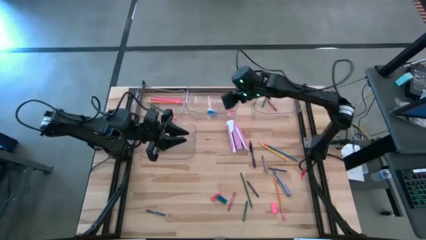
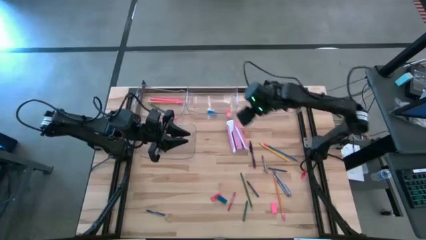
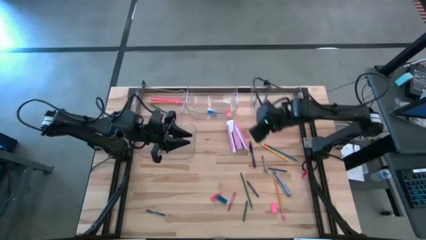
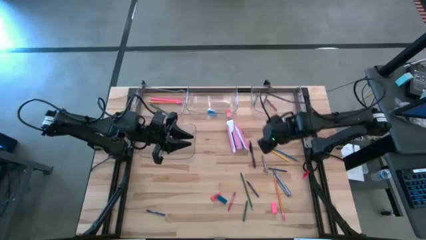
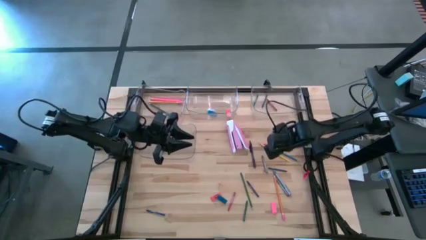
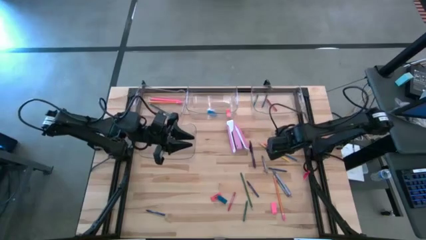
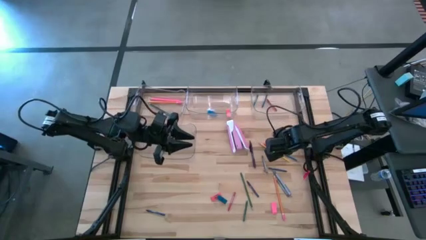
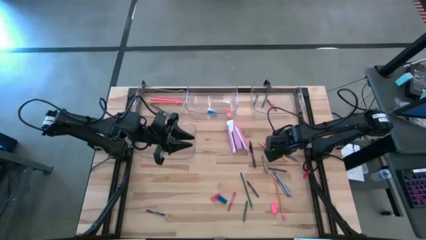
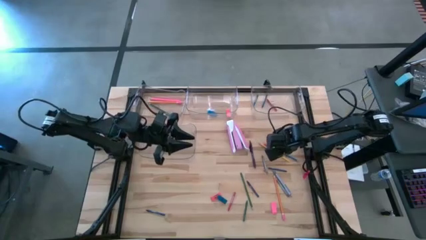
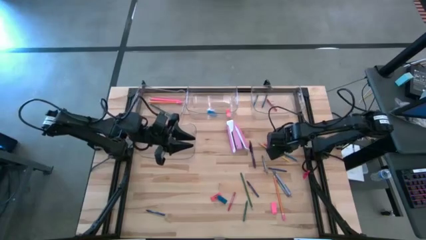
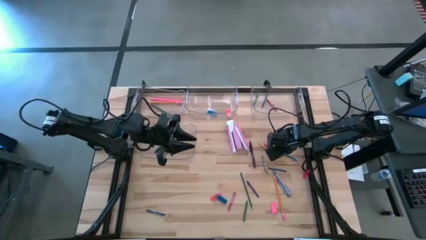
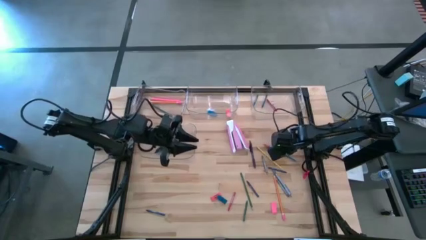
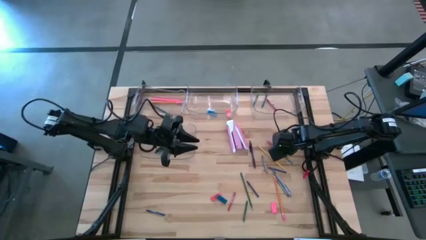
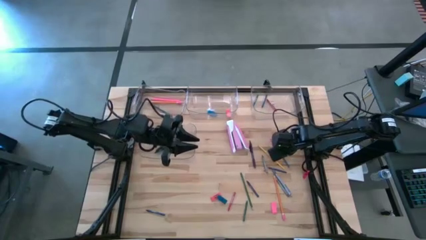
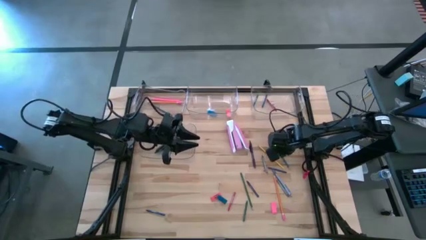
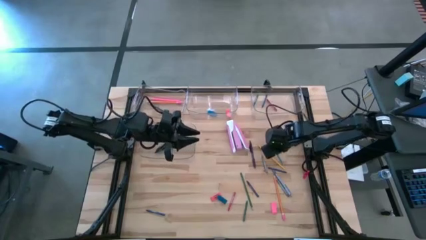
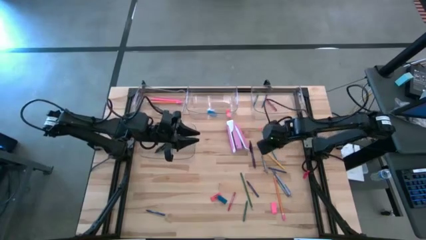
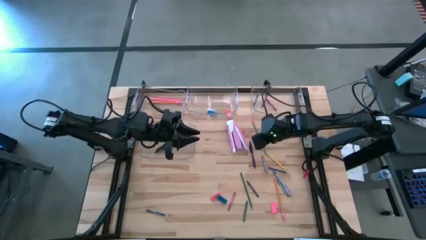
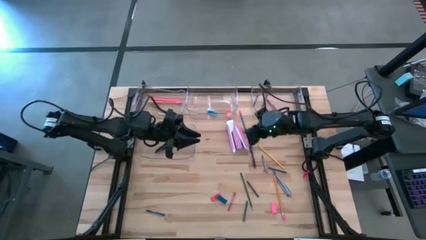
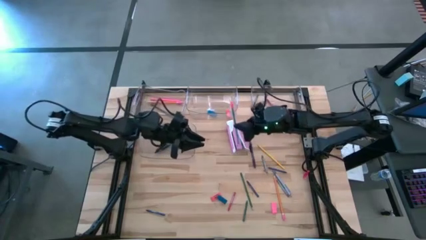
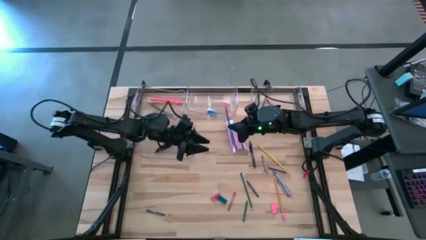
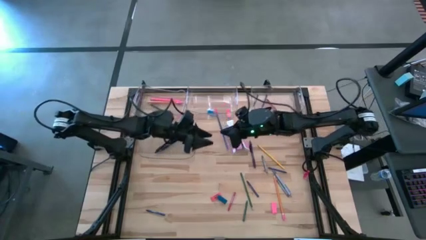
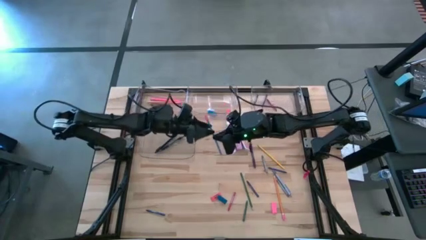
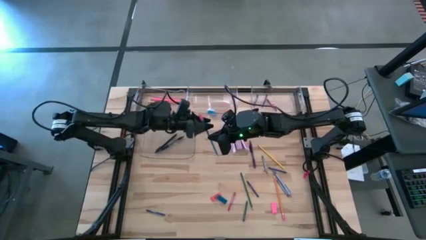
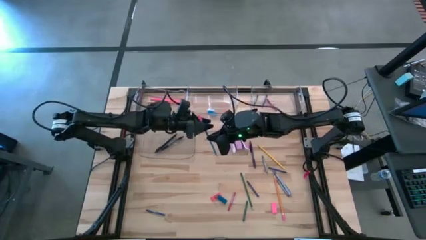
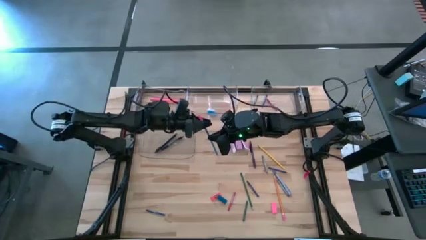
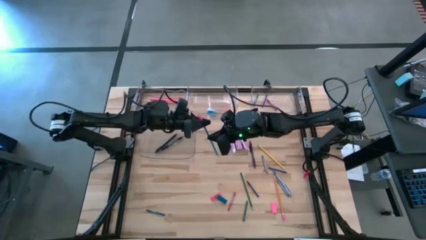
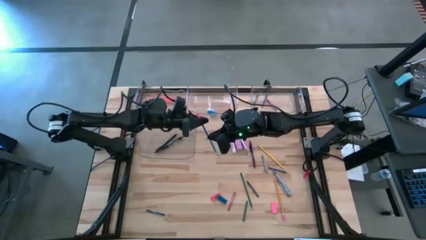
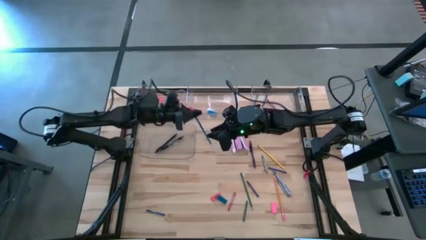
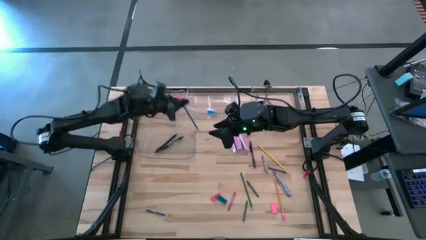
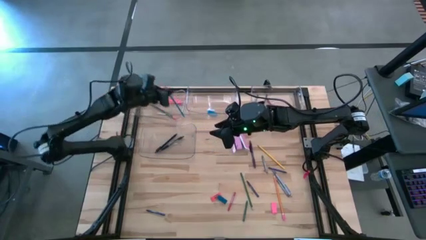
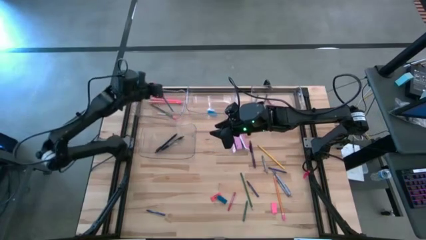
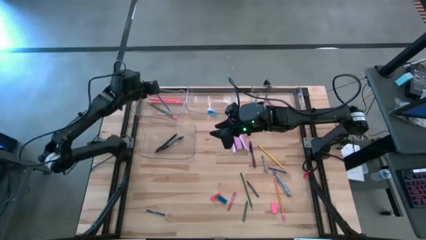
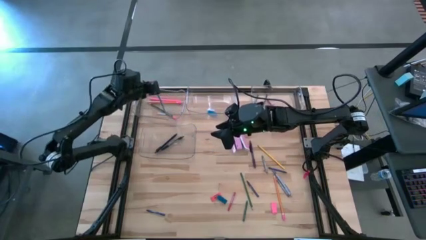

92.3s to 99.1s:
Task: Sort crayons/erasers/pens/pencils in bins
Put the blue pencil into the top left transparent bin

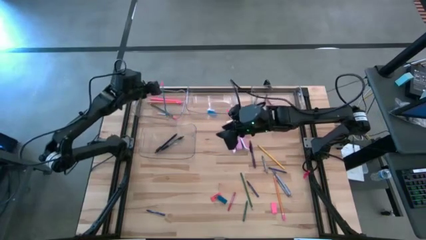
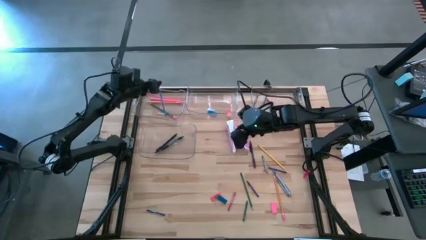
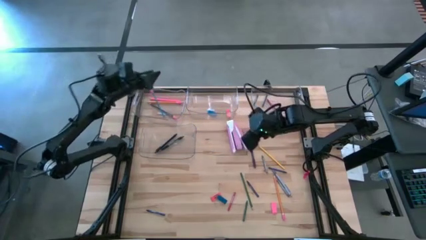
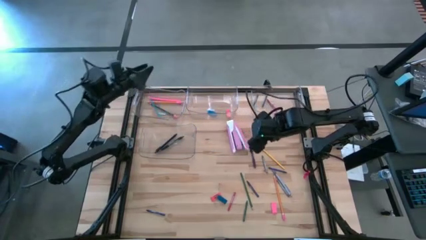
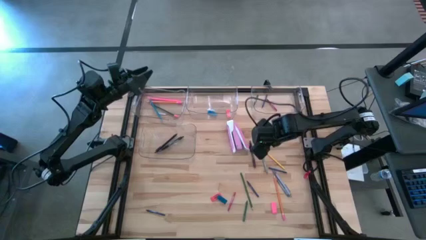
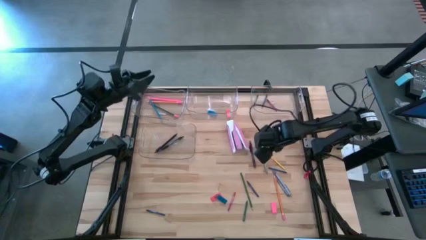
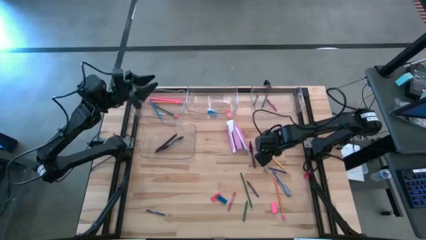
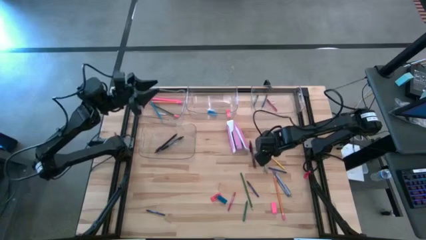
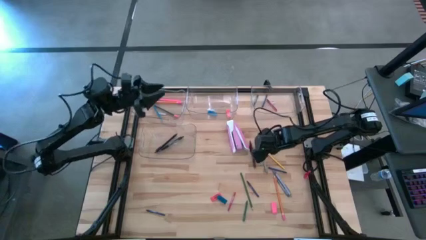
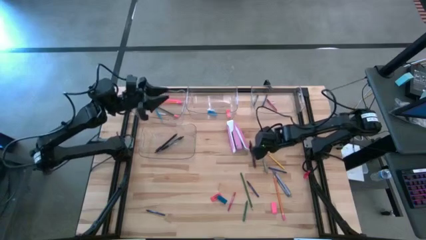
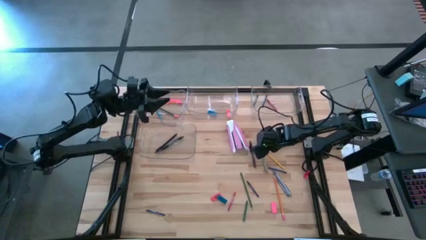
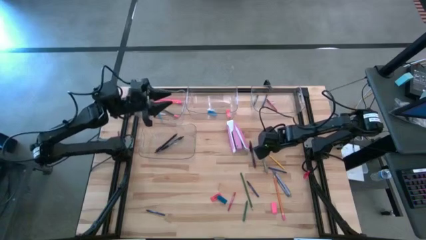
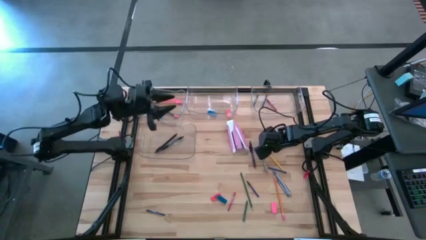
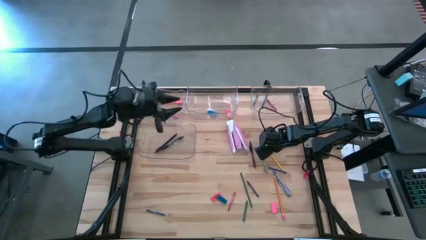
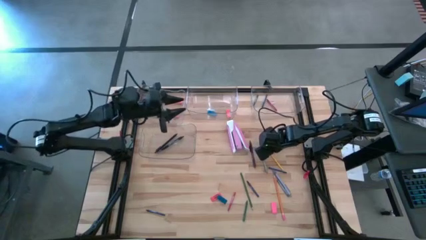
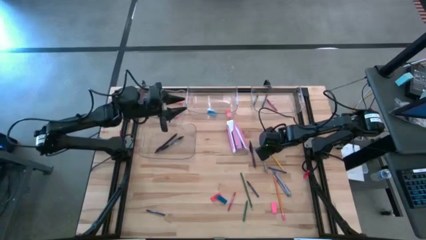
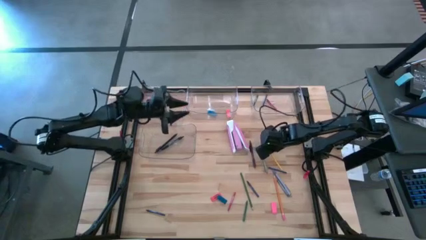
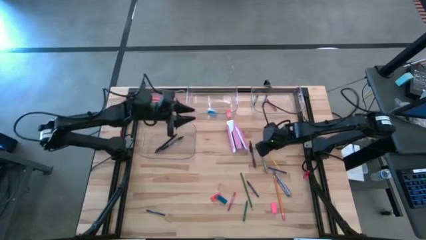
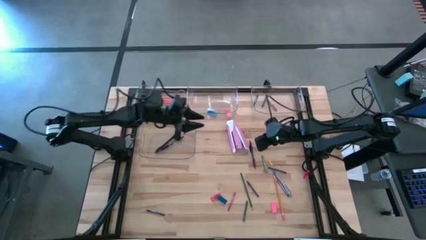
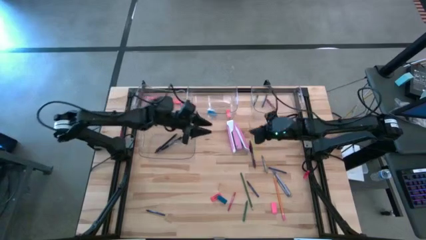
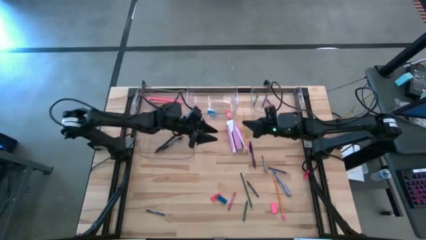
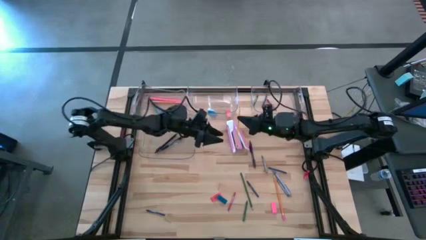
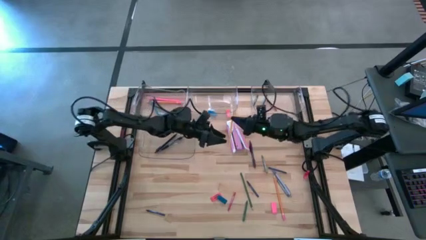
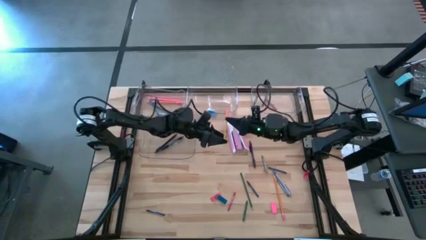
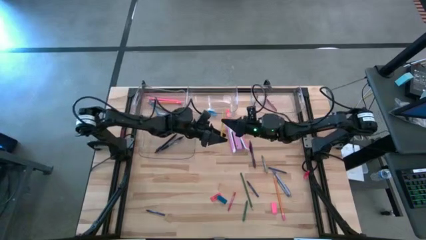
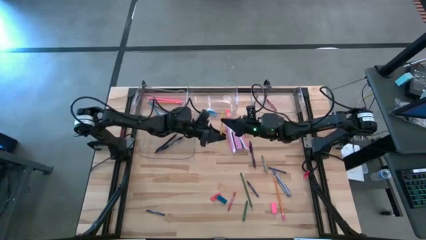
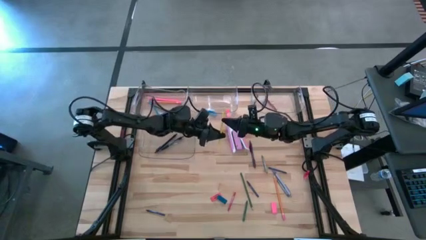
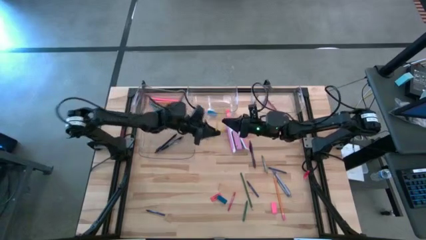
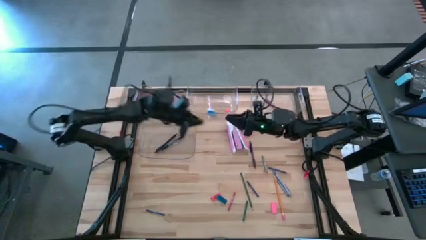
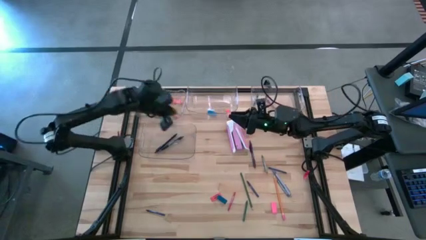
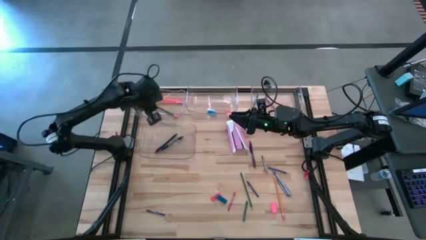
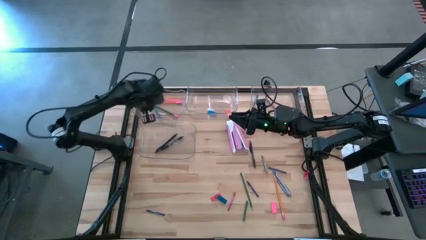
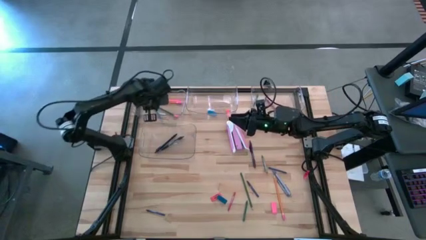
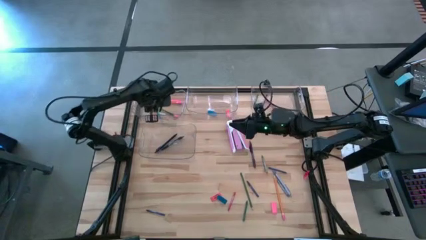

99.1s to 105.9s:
Put the yellow pencil into the top left transparent bin

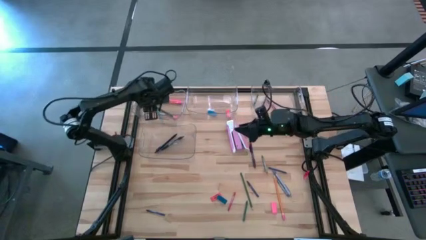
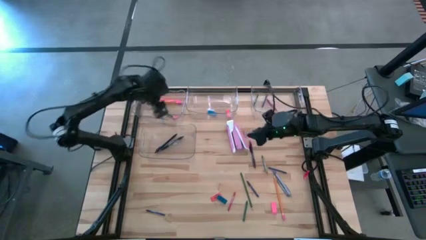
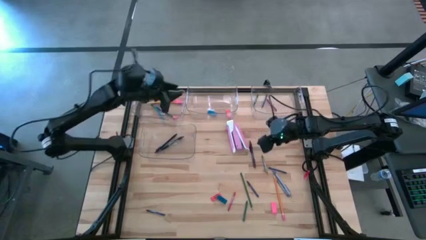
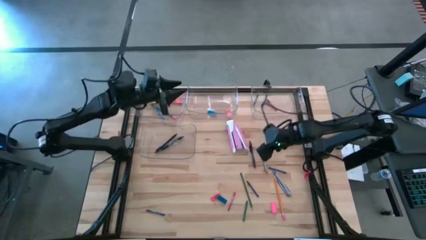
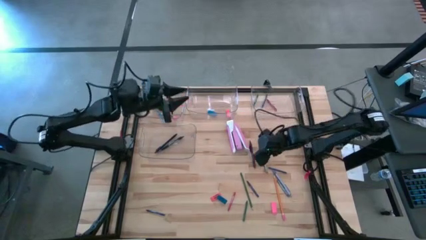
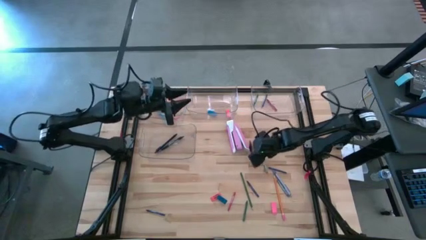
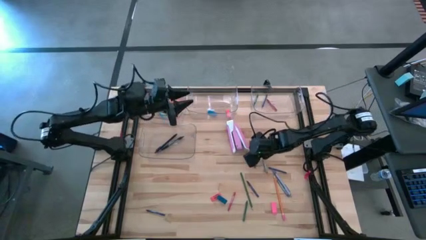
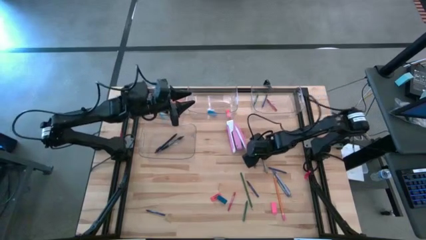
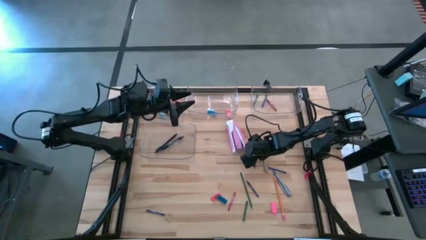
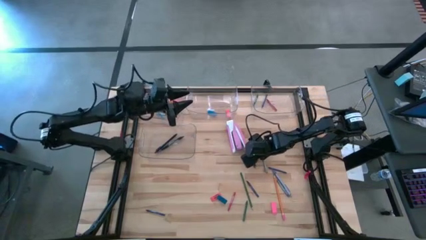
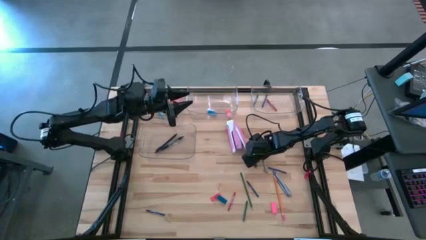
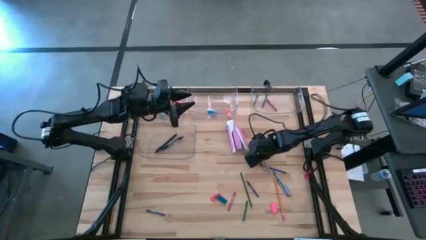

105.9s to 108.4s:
Put the purple pen into the bottom left transparent bin
